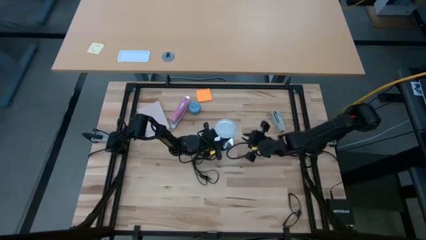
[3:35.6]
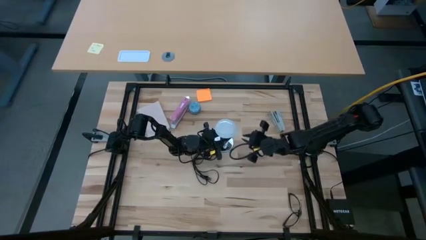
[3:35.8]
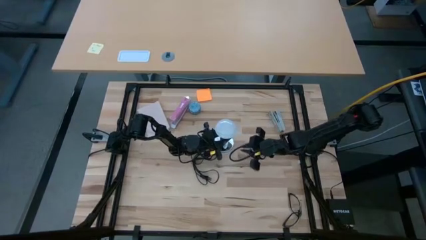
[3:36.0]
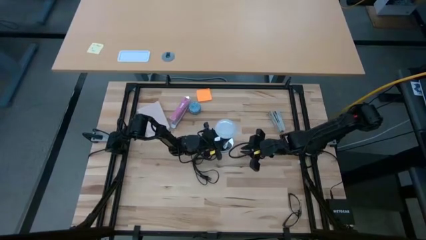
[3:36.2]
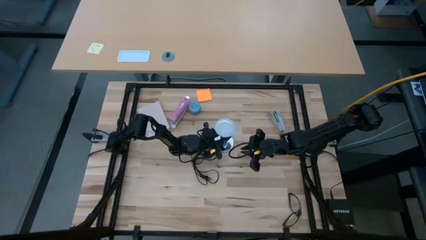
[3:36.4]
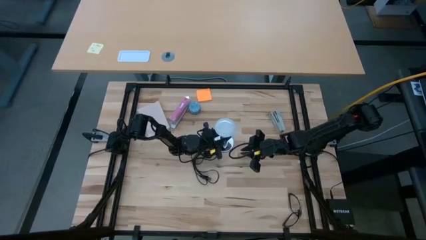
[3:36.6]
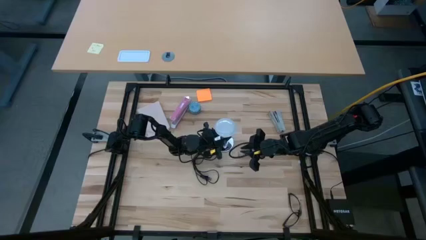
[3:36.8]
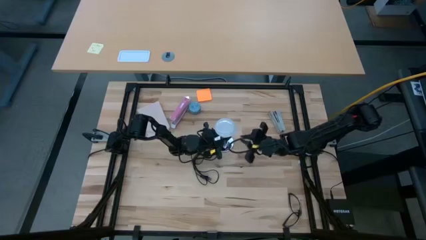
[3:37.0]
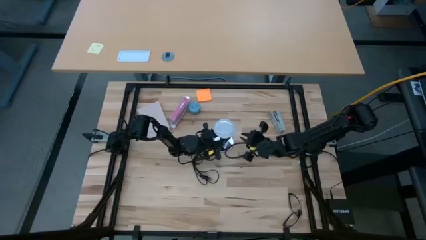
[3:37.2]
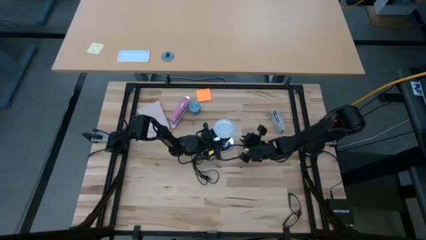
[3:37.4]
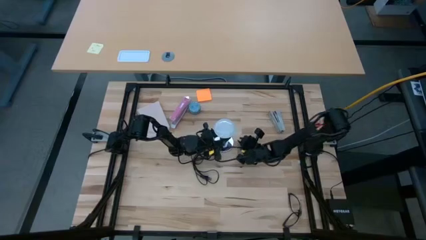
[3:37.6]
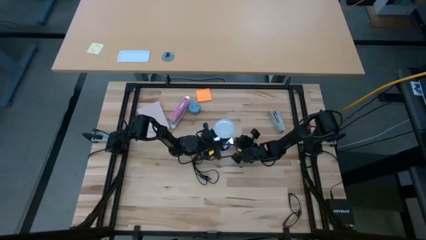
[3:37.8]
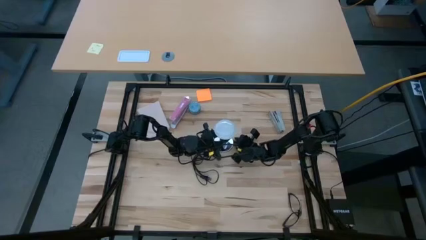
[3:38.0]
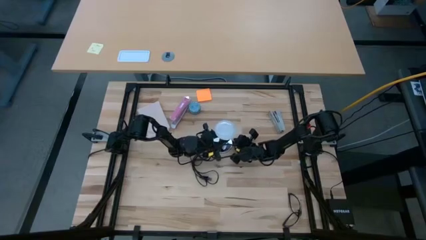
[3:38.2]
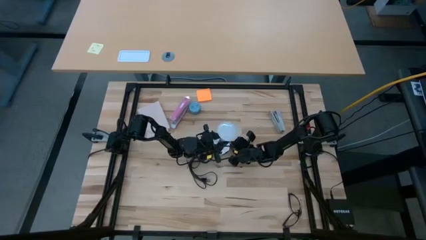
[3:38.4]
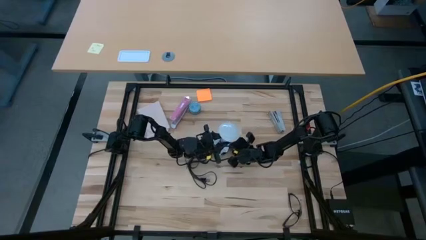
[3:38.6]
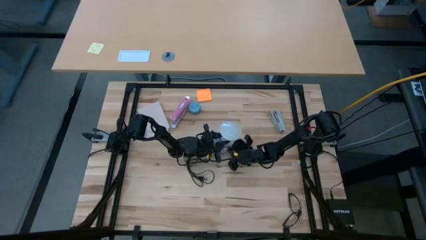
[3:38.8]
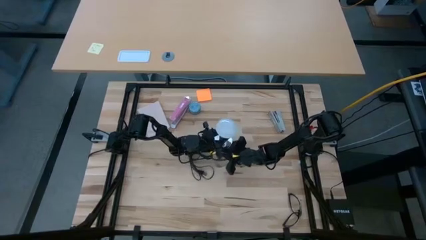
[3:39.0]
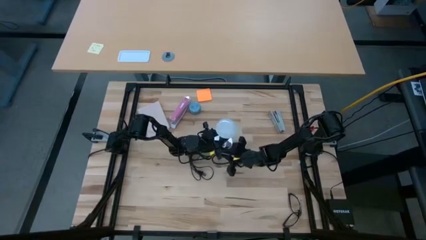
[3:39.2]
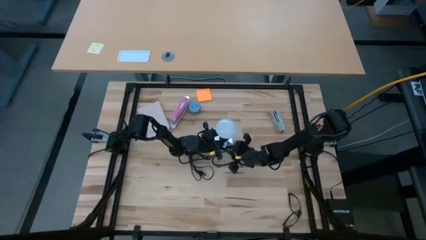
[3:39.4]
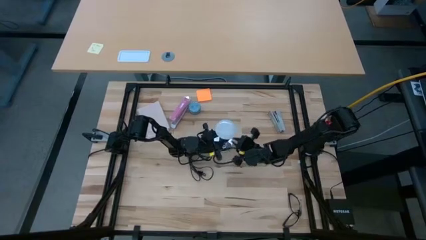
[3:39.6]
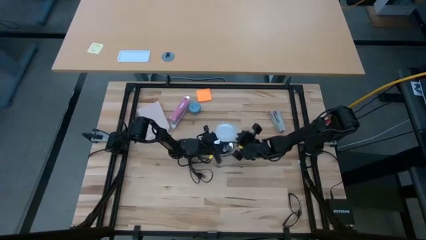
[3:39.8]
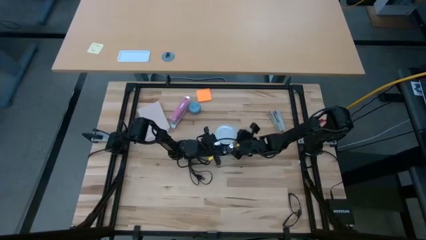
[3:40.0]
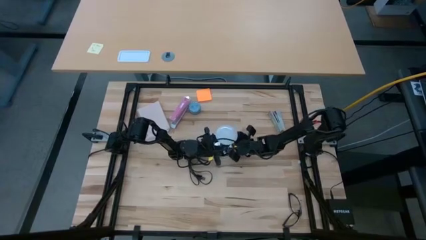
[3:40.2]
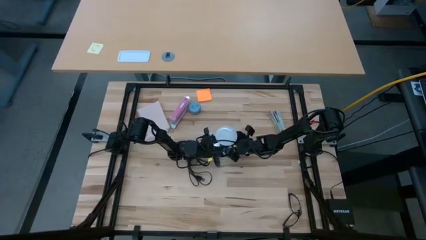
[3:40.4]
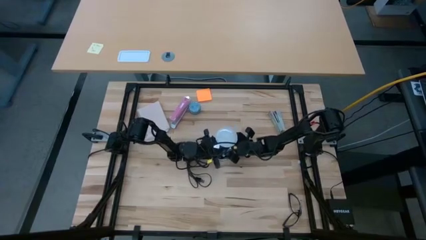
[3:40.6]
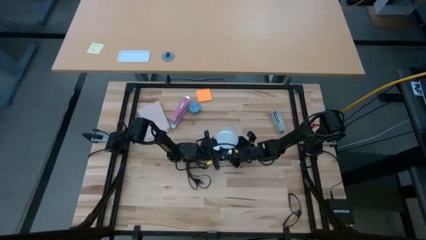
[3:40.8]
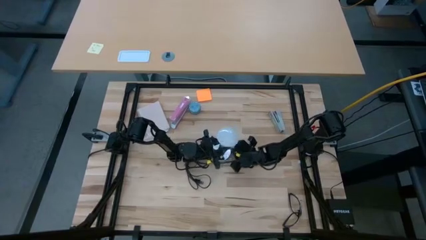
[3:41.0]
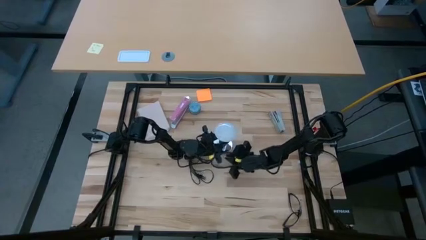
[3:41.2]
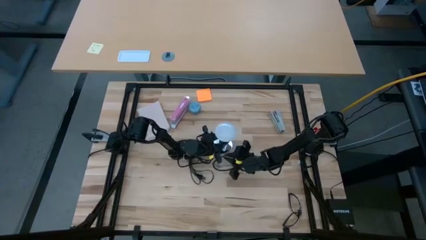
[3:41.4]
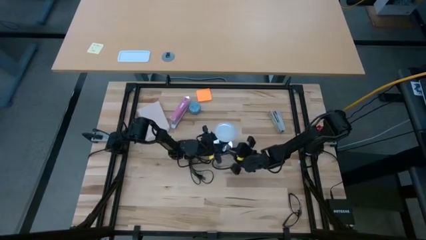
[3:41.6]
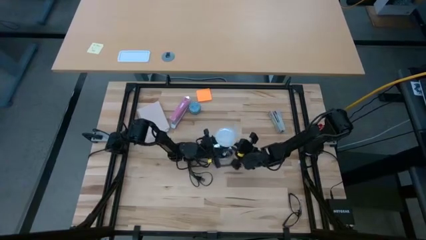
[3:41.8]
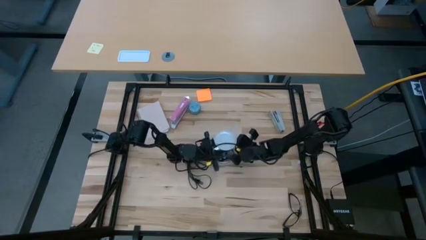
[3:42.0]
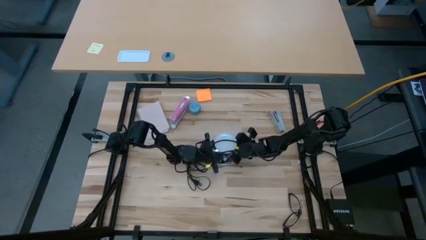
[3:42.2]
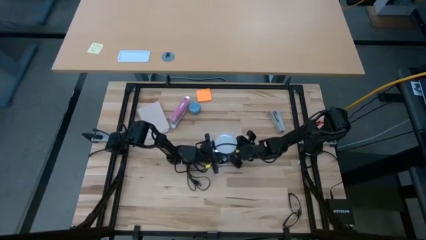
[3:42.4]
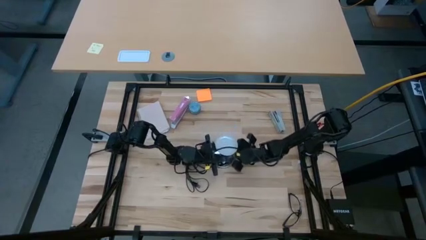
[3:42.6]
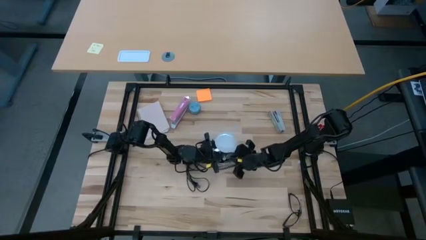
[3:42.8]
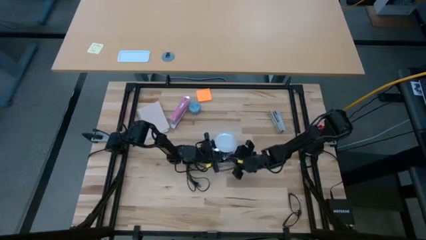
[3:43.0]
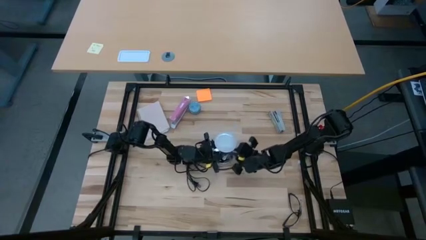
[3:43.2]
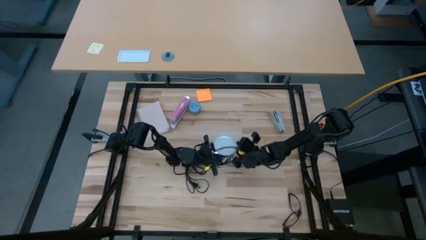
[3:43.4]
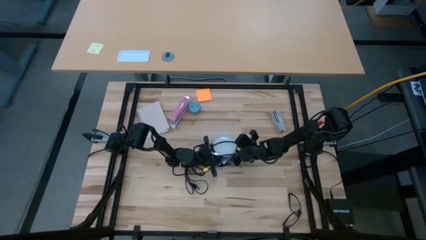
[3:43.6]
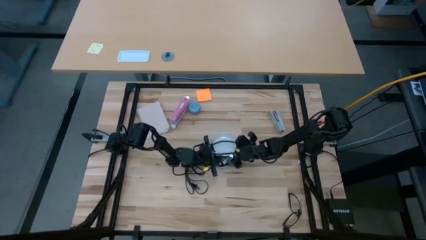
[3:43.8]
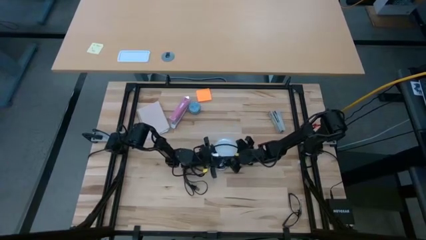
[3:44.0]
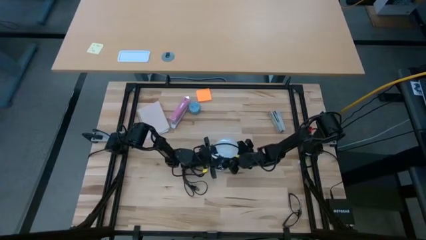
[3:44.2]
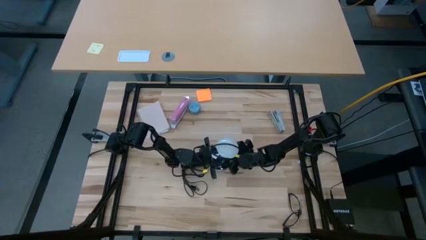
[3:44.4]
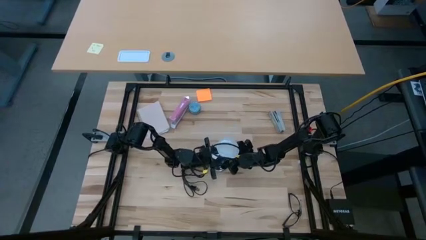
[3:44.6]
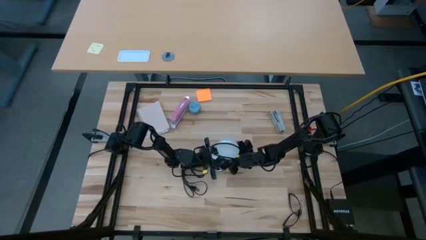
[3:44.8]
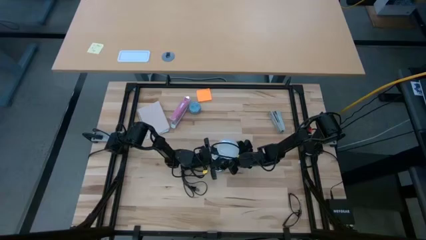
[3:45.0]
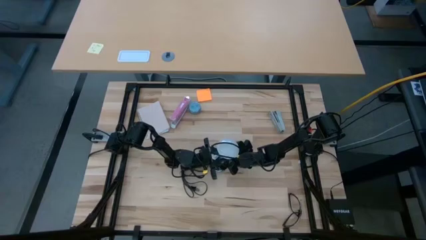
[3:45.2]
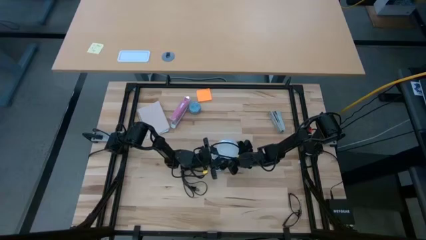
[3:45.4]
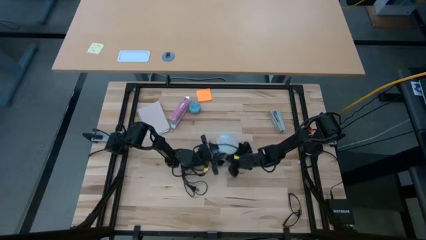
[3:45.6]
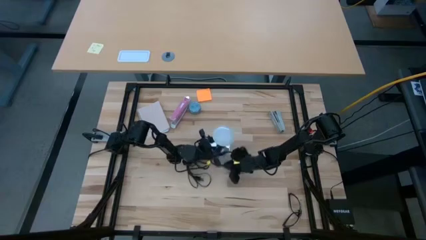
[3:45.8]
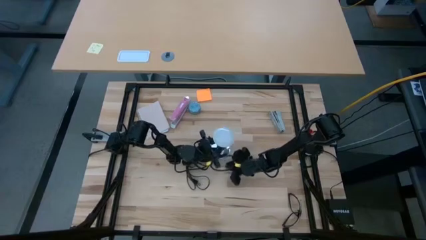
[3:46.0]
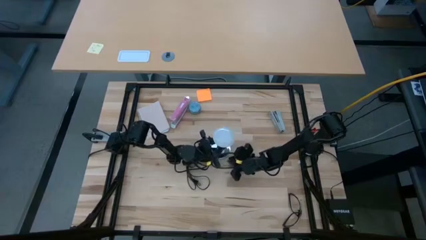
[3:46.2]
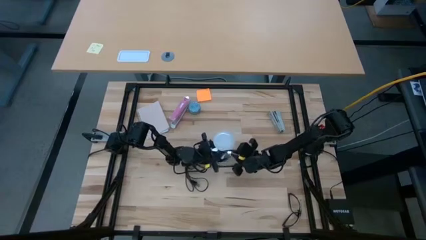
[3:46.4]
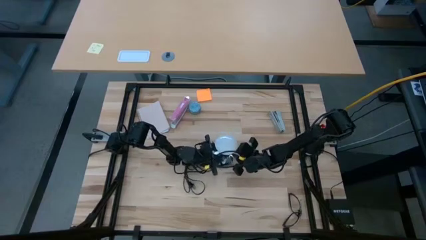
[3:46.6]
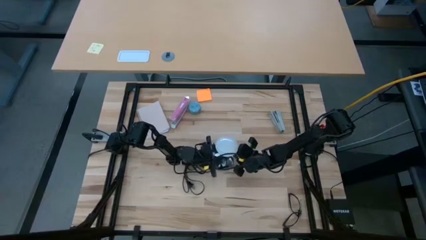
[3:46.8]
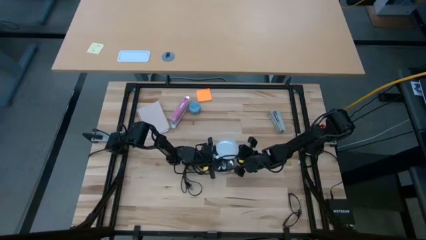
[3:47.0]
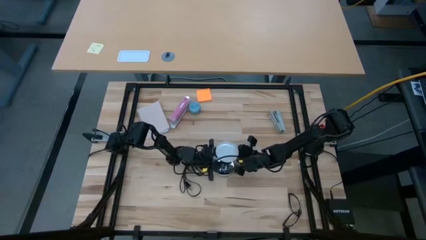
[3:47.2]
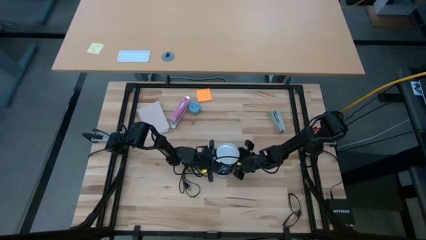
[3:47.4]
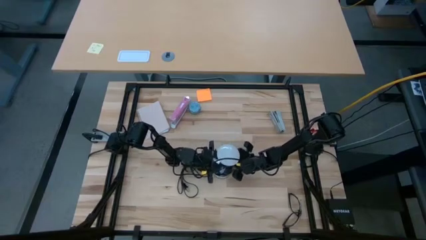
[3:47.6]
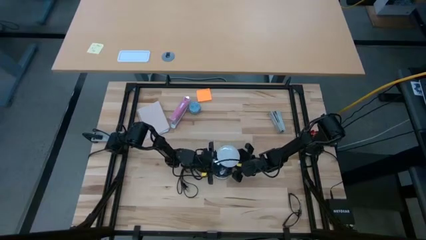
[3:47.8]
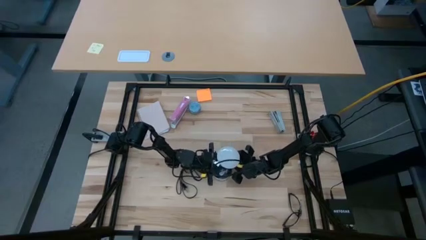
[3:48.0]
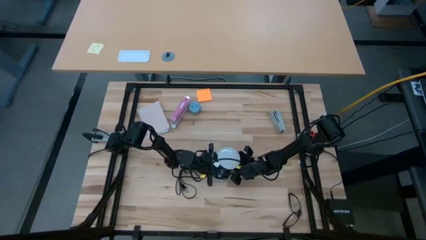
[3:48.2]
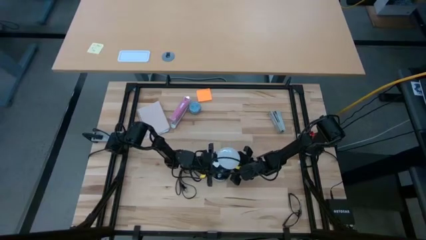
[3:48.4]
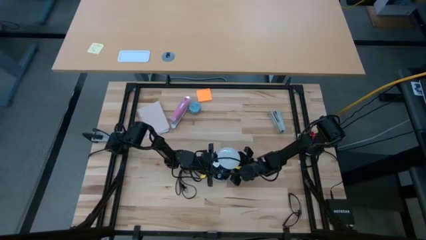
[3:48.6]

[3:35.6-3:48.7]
Task: Screw lightbulb
Remove the lightbulb from the lamp
